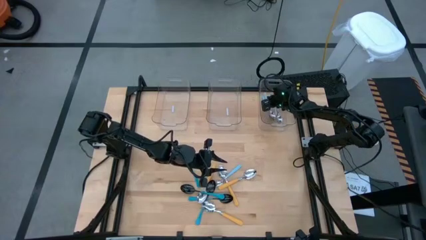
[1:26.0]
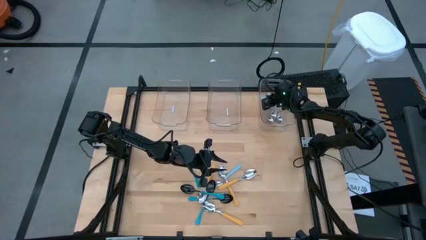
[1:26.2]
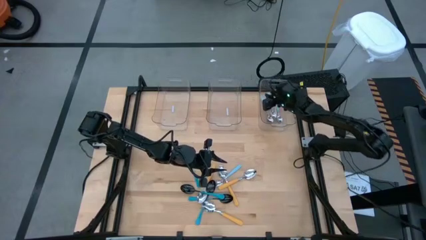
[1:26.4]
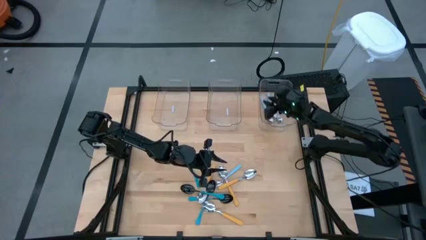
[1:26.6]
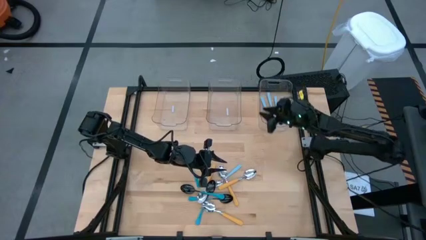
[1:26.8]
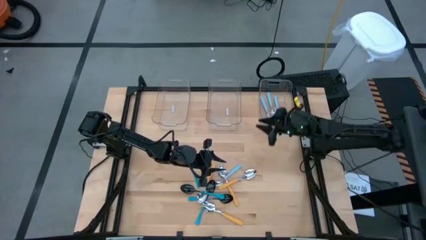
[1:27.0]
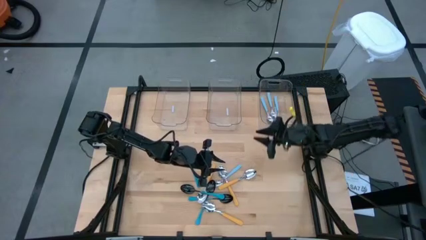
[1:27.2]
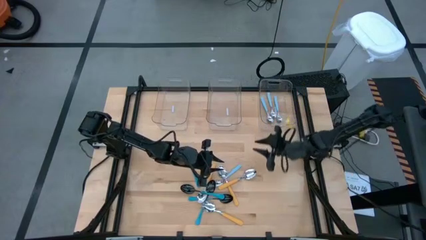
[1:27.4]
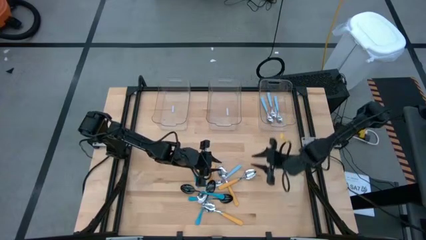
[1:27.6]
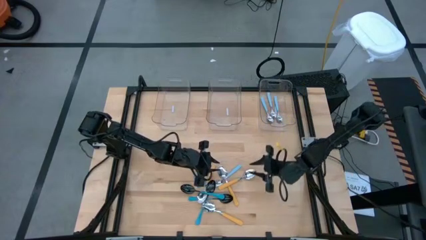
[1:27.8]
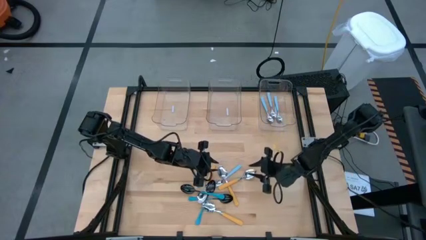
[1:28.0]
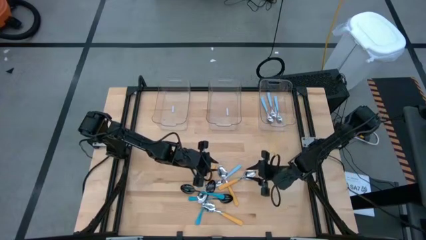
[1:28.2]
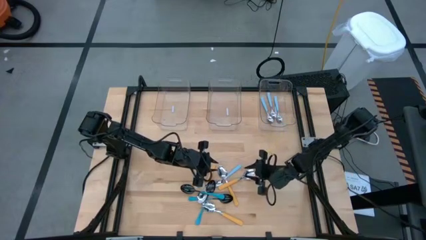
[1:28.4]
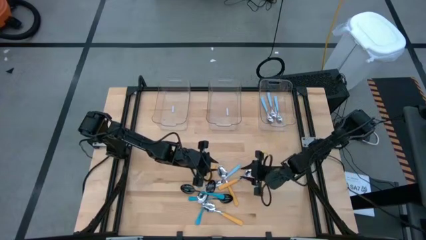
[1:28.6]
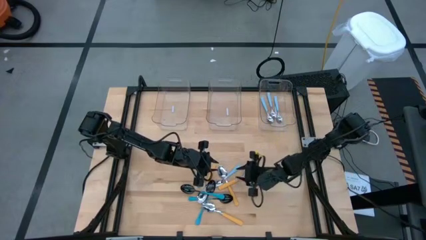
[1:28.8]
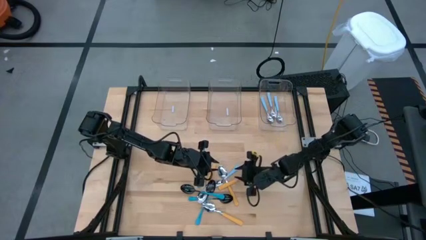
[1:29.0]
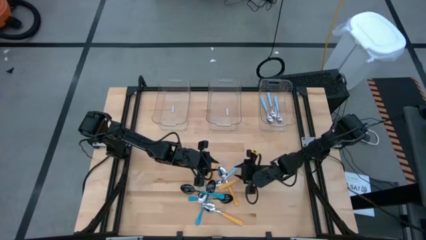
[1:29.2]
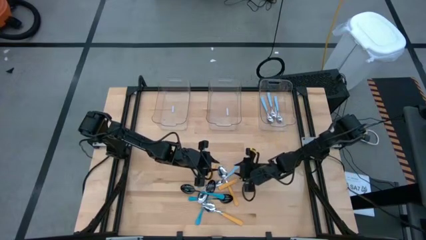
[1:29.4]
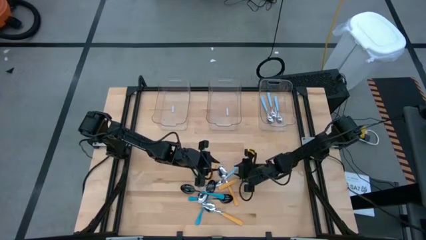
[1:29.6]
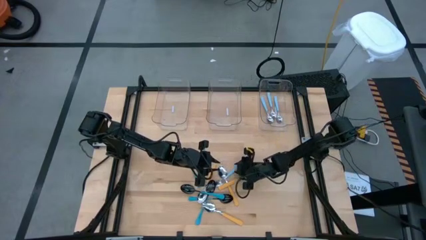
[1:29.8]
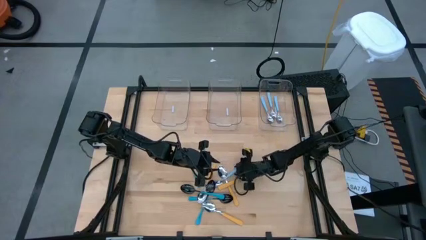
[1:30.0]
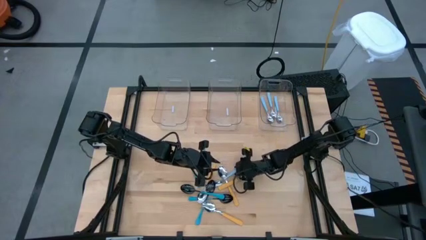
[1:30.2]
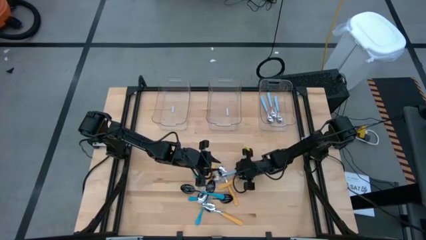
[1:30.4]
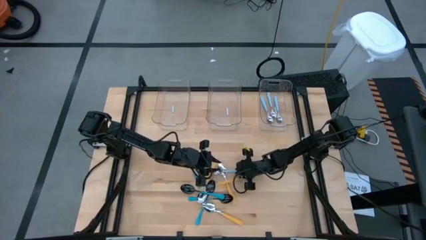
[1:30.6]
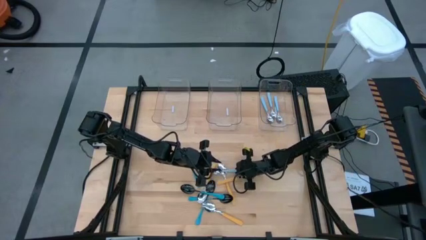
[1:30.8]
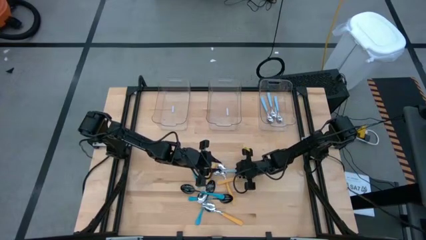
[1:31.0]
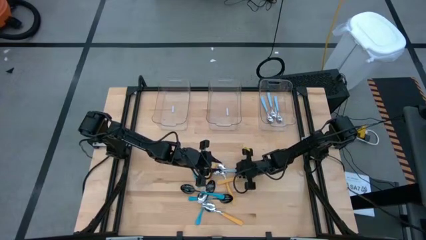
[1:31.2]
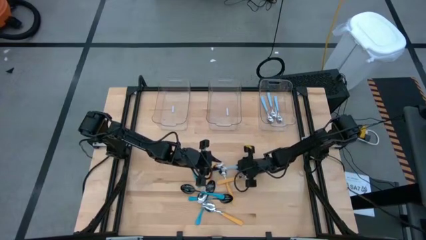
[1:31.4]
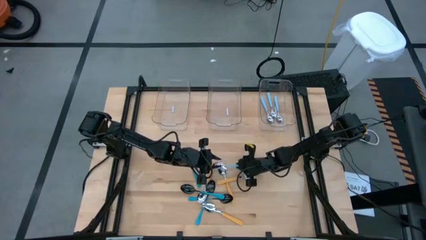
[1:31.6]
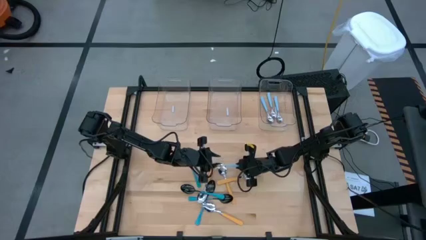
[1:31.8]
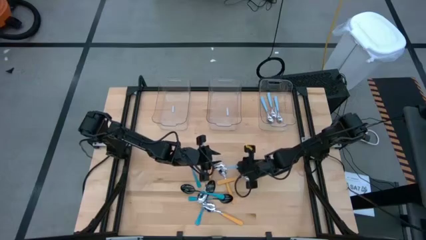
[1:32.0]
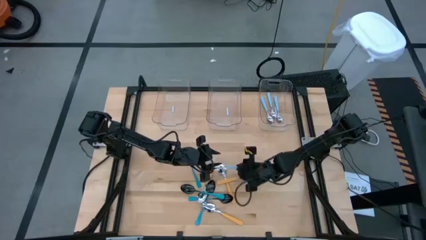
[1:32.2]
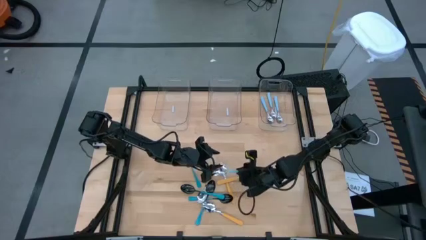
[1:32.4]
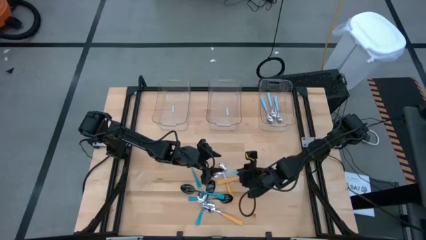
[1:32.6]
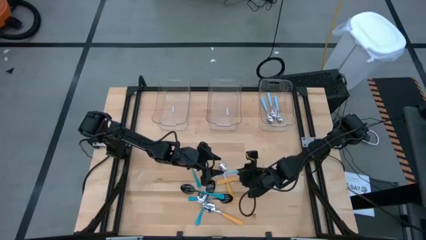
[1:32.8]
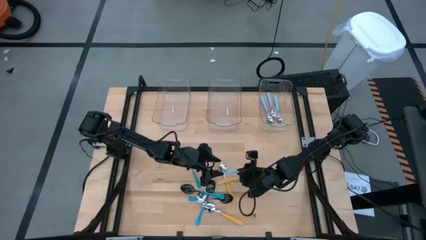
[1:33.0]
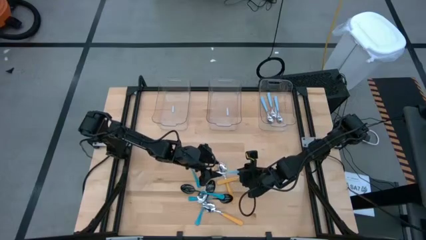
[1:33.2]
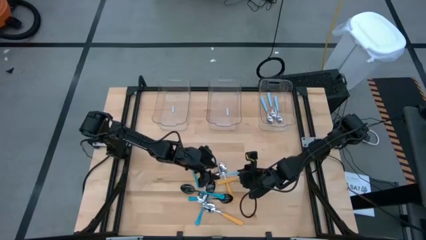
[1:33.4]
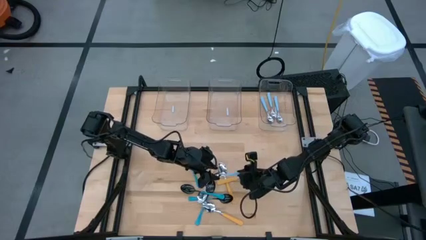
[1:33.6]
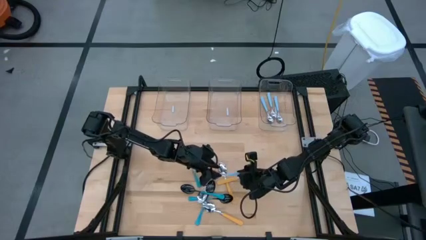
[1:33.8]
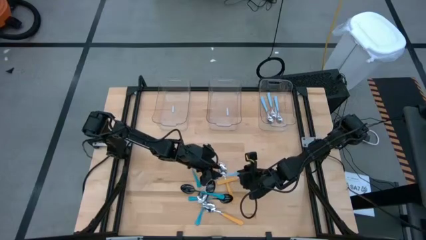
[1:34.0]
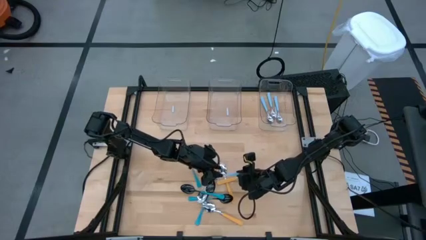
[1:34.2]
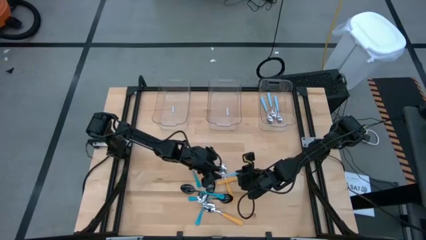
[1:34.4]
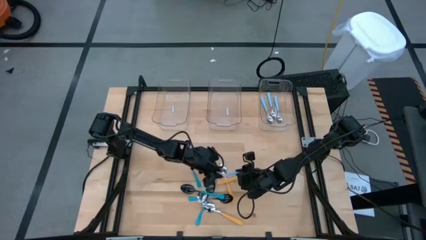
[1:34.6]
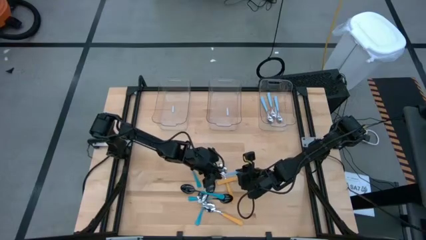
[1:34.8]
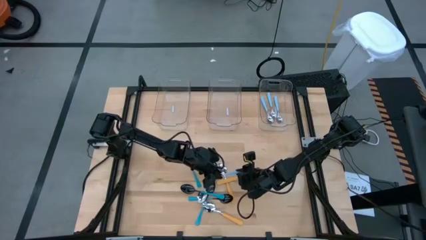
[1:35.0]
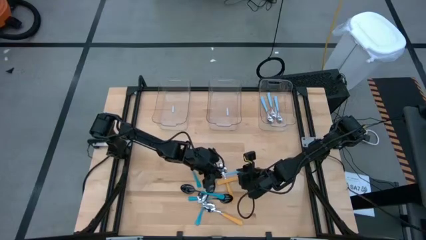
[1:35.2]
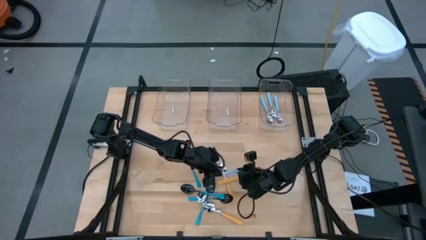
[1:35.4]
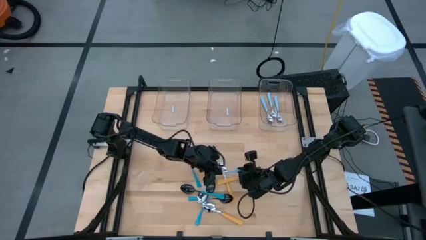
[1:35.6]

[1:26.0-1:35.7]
Task: Sort silverware by color (type)
Put the light blue spoon into the right transparent bin

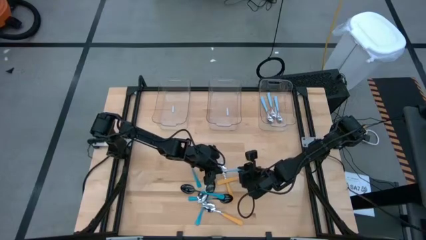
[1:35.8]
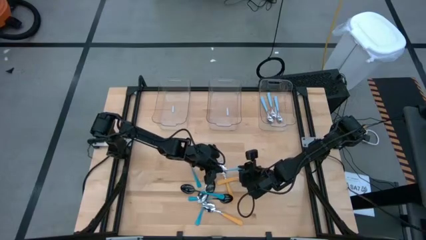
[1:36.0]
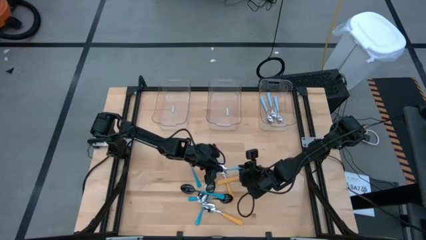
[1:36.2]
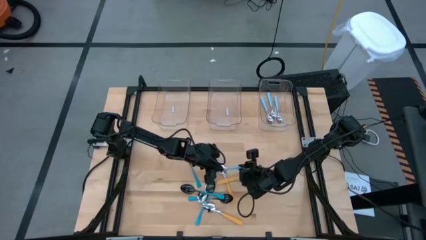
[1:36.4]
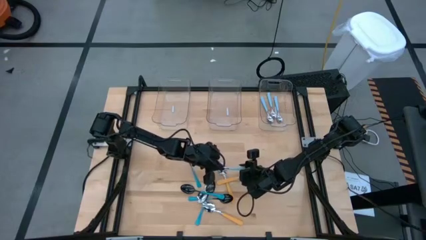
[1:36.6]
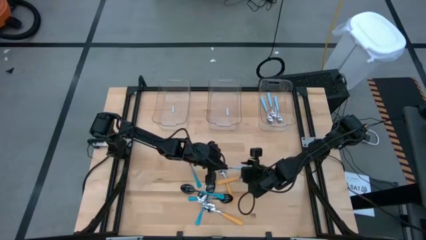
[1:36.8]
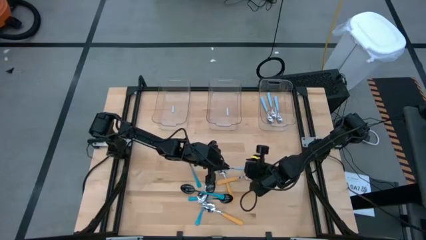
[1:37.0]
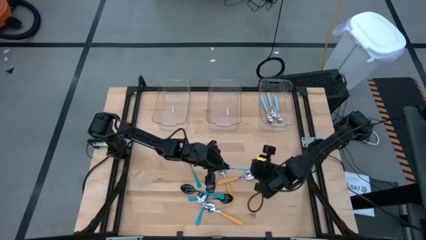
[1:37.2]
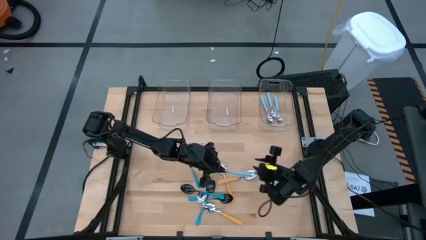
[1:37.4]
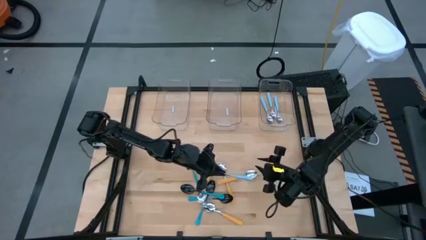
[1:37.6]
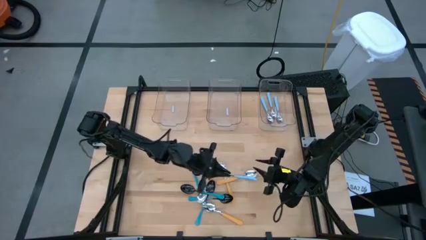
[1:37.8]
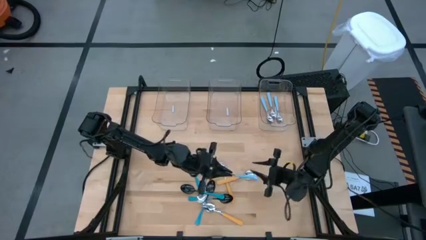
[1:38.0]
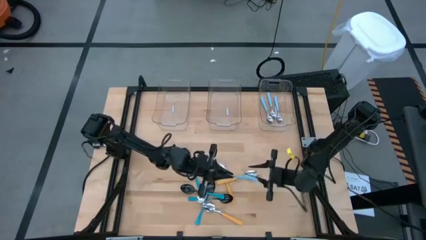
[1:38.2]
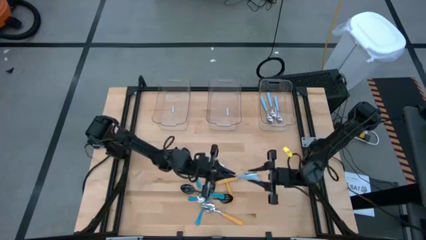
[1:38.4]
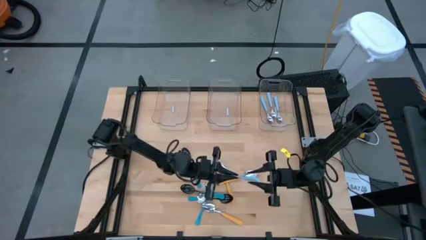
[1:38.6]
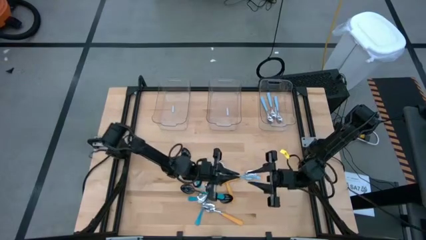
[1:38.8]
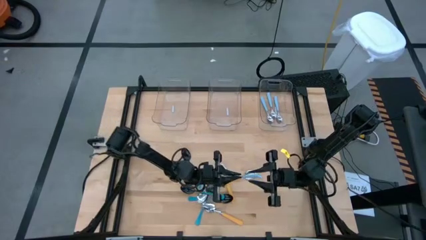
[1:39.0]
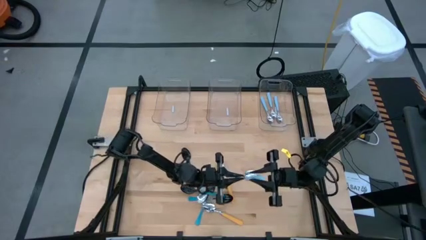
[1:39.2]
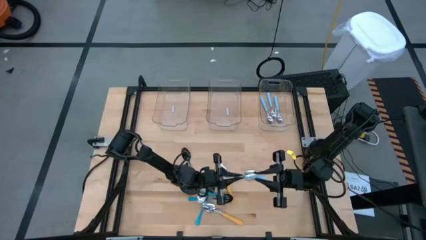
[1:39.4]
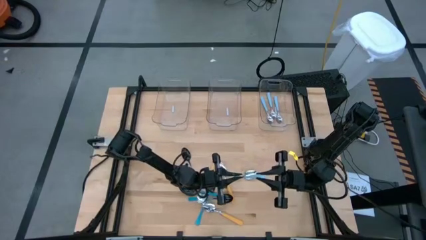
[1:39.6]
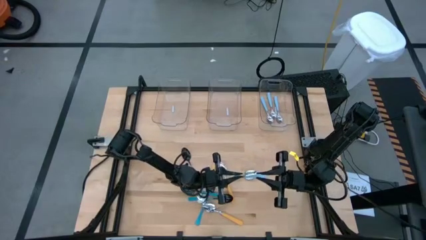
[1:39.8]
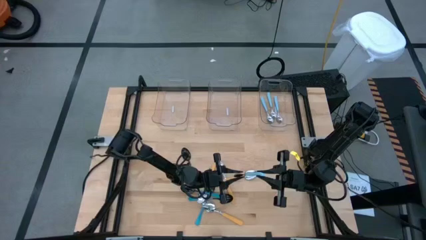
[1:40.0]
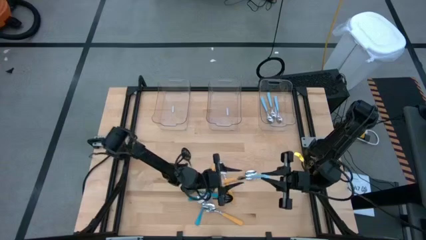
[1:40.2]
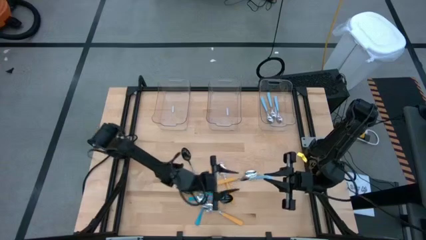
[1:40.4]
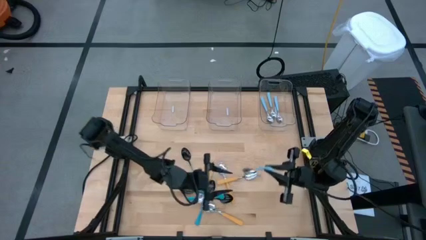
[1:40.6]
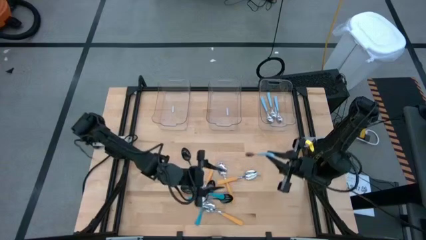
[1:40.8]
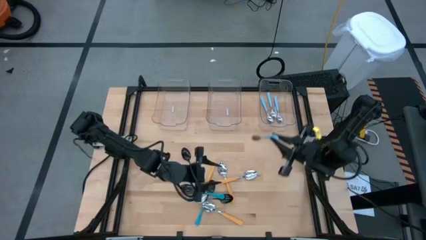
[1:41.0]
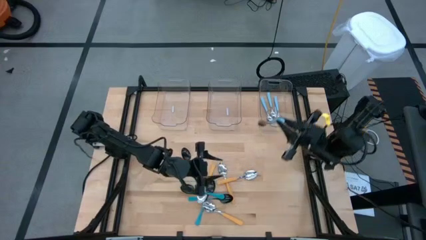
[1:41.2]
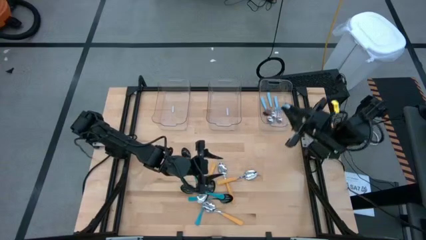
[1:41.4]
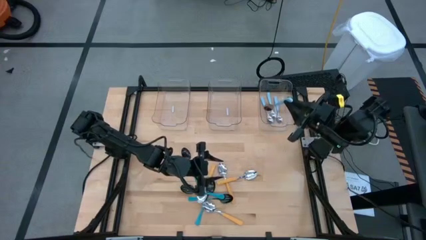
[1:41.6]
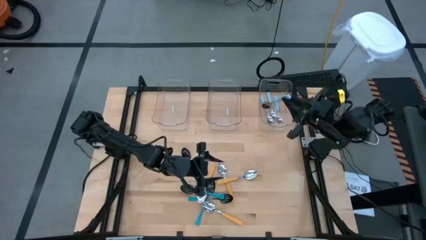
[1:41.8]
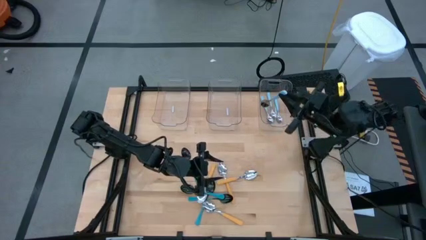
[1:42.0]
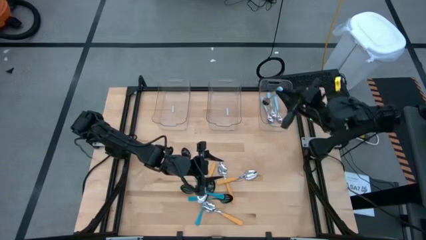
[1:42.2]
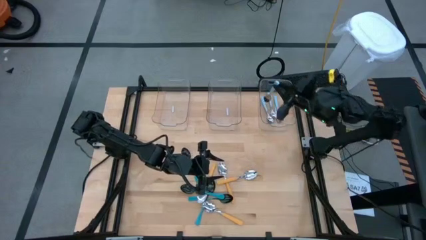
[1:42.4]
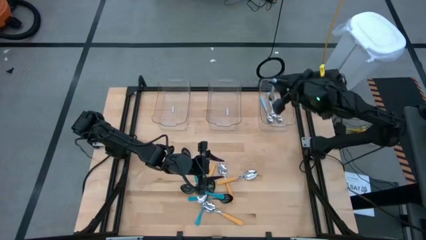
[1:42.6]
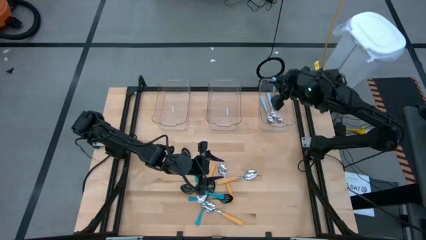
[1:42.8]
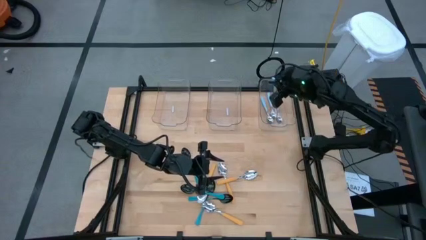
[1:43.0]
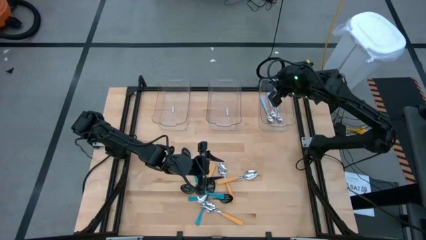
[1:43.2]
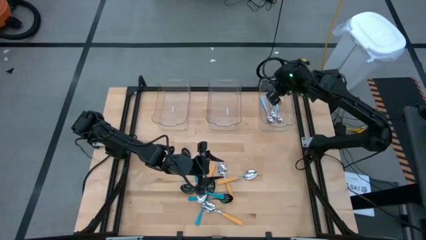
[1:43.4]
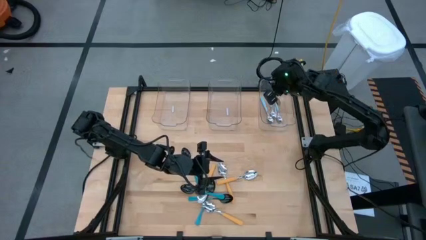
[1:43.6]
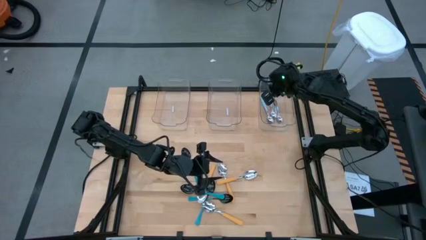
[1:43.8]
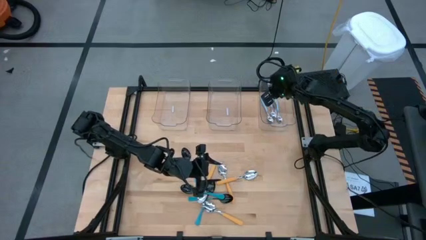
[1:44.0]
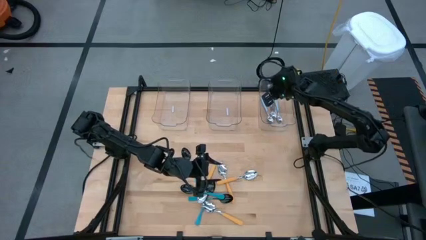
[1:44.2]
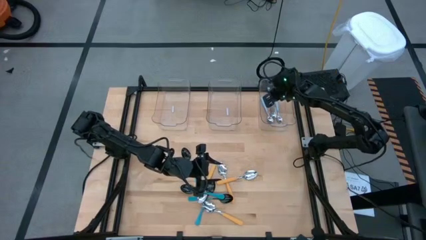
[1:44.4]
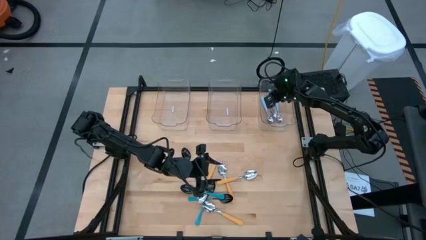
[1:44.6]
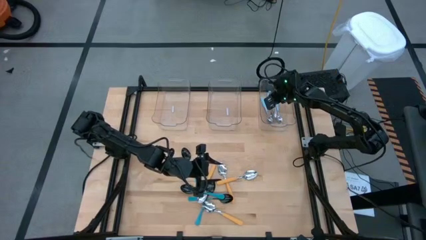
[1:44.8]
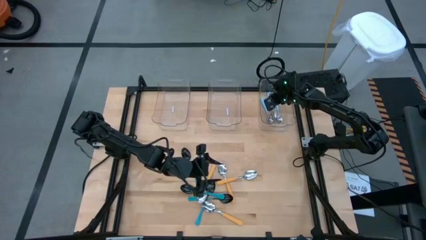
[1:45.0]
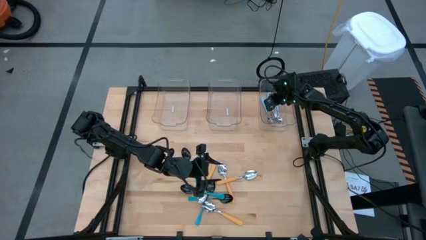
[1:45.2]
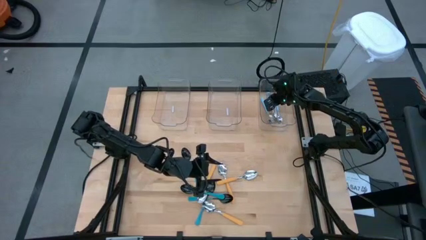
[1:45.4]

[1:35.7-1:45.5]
Put the light blue spoon into the right transparent bin
